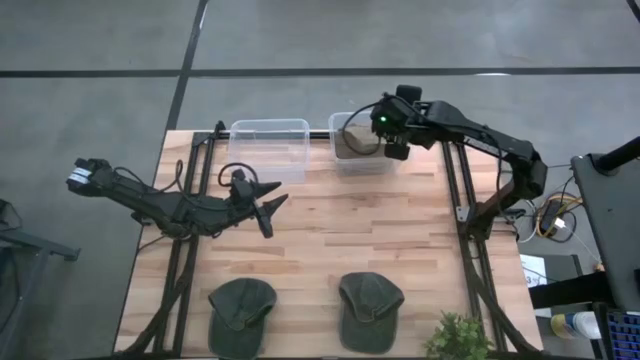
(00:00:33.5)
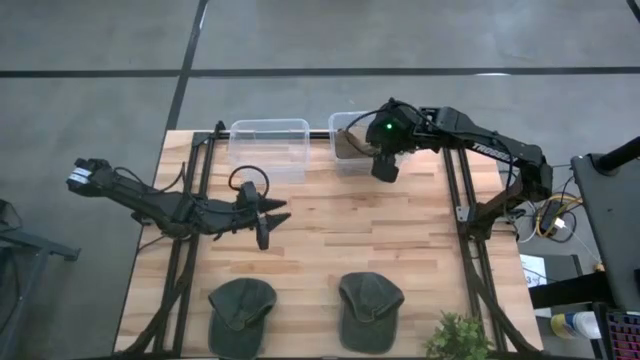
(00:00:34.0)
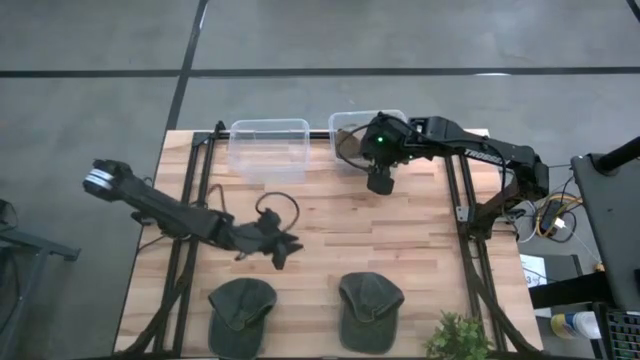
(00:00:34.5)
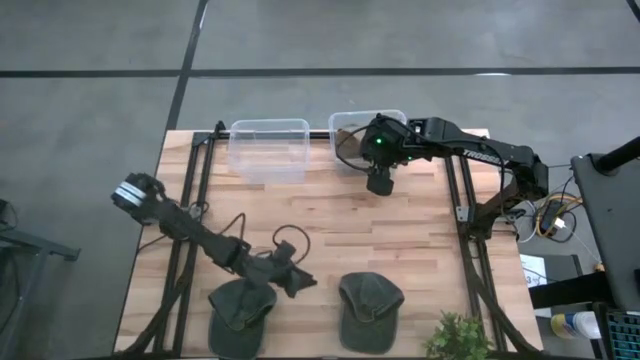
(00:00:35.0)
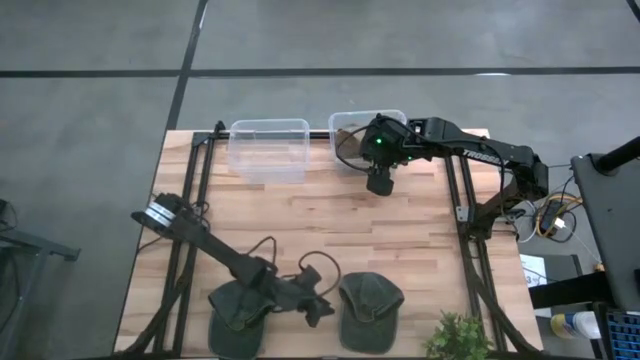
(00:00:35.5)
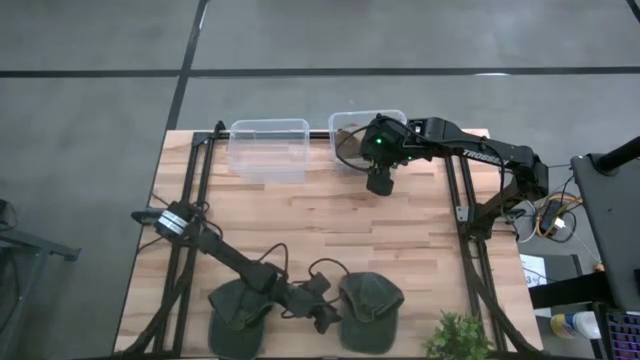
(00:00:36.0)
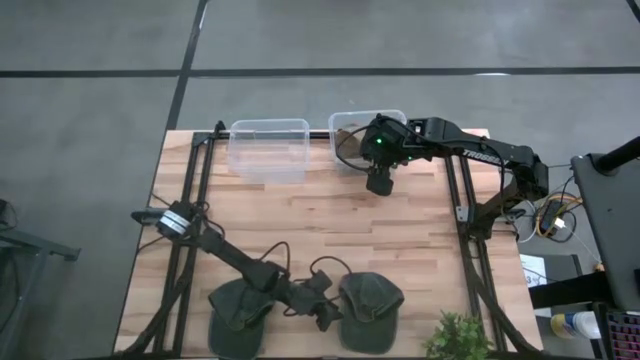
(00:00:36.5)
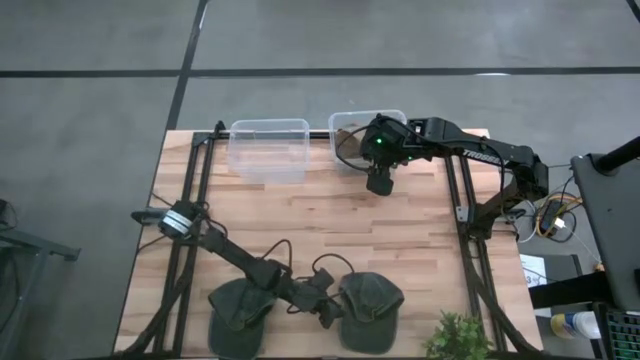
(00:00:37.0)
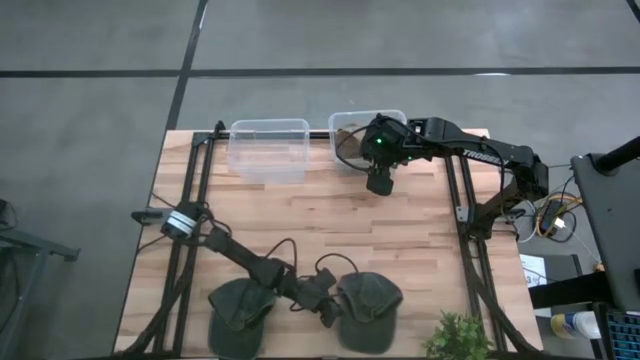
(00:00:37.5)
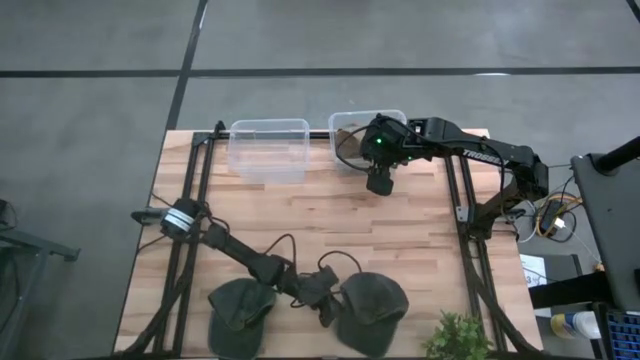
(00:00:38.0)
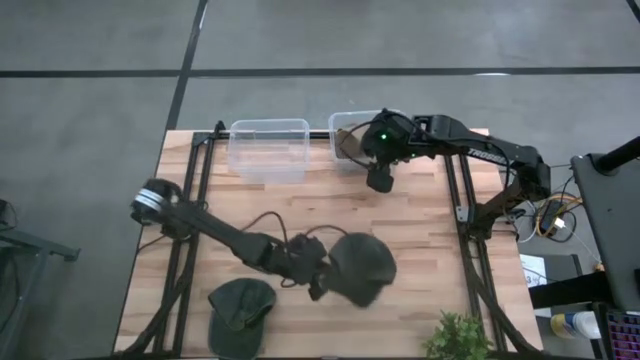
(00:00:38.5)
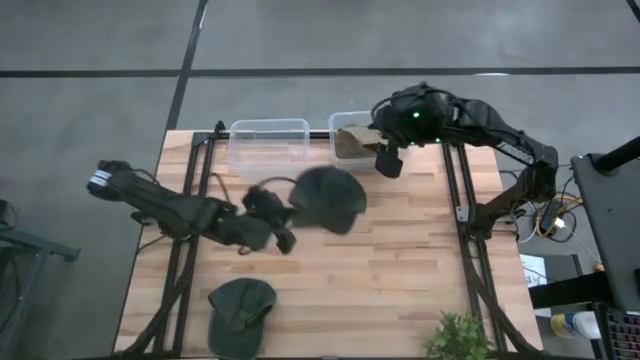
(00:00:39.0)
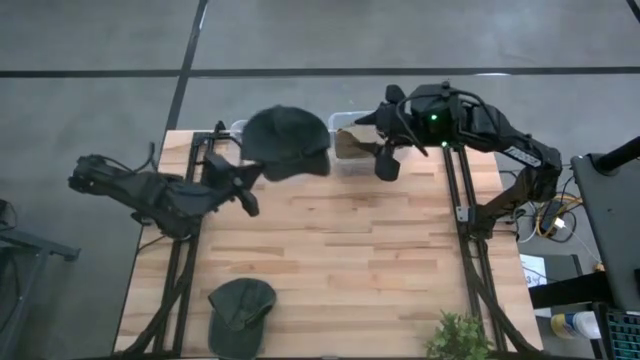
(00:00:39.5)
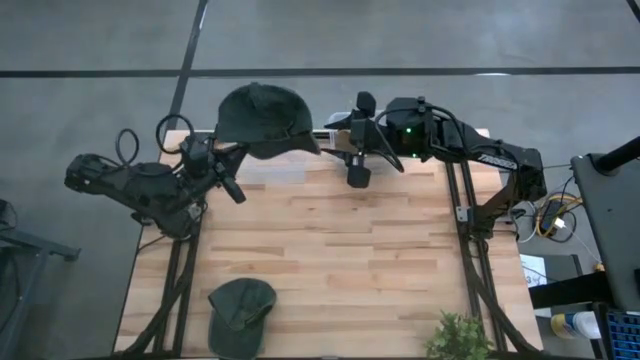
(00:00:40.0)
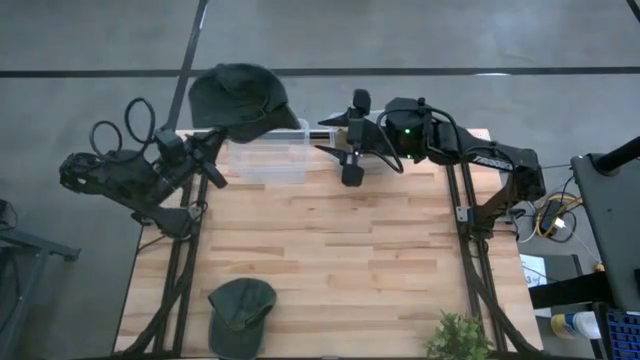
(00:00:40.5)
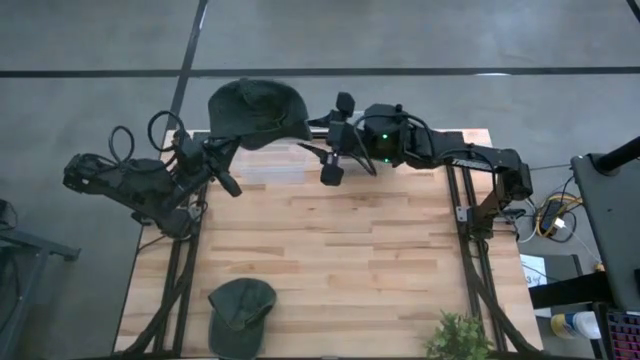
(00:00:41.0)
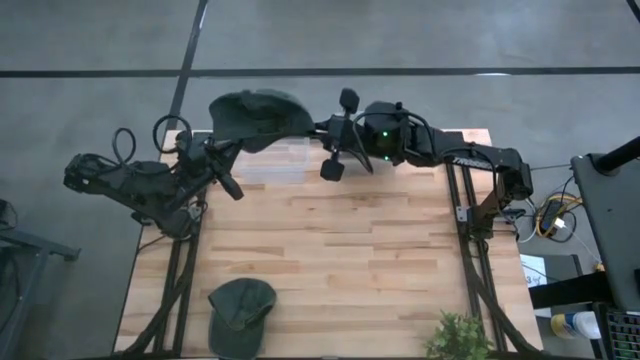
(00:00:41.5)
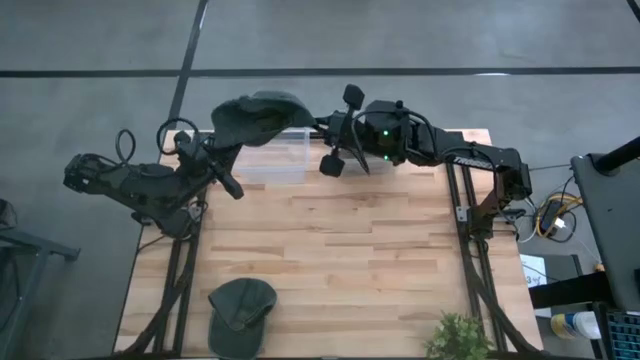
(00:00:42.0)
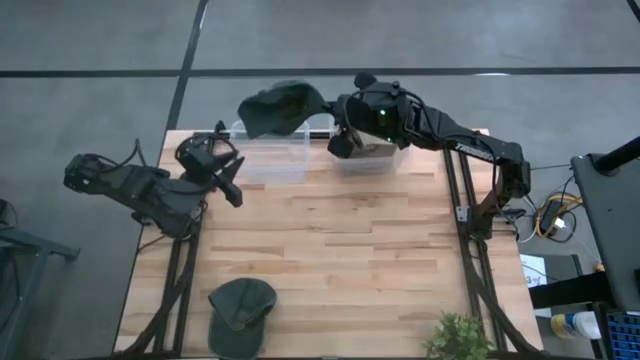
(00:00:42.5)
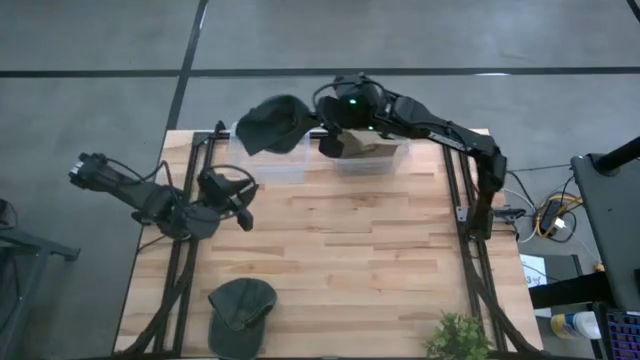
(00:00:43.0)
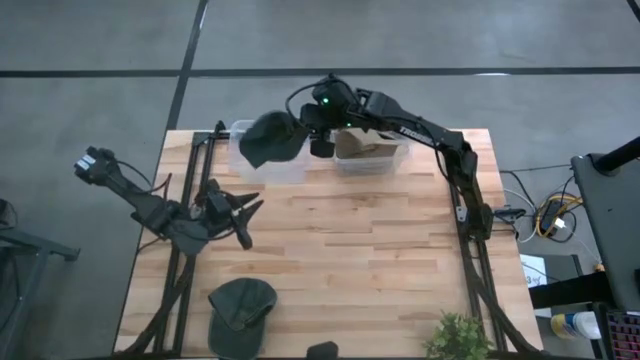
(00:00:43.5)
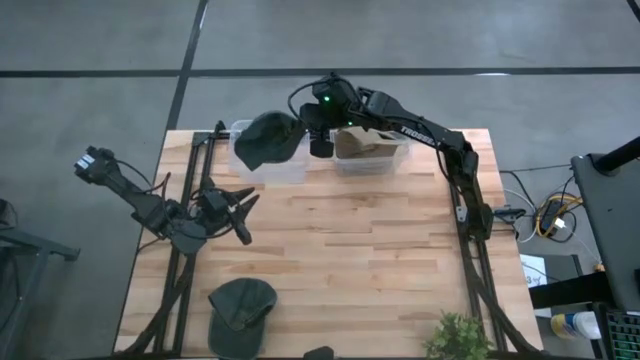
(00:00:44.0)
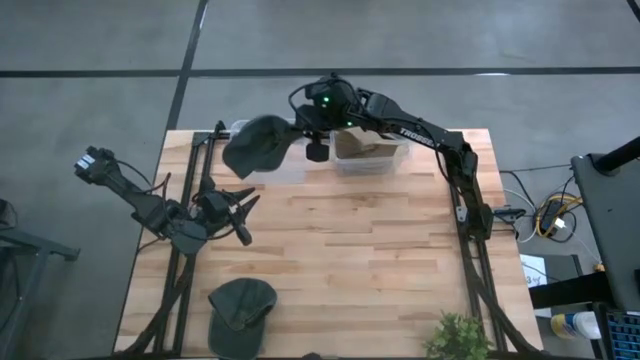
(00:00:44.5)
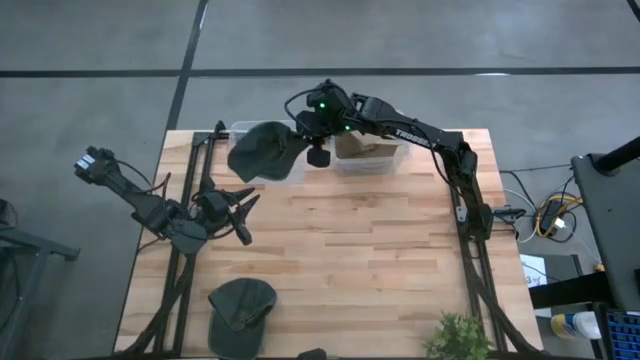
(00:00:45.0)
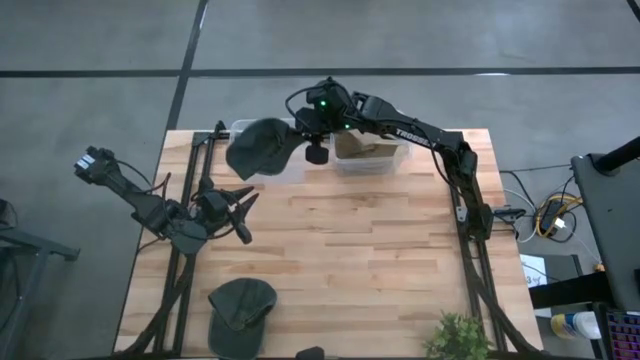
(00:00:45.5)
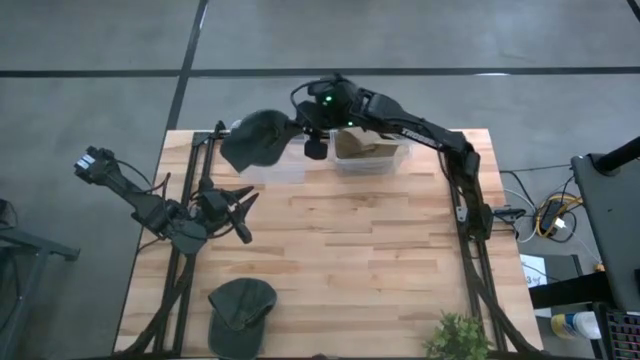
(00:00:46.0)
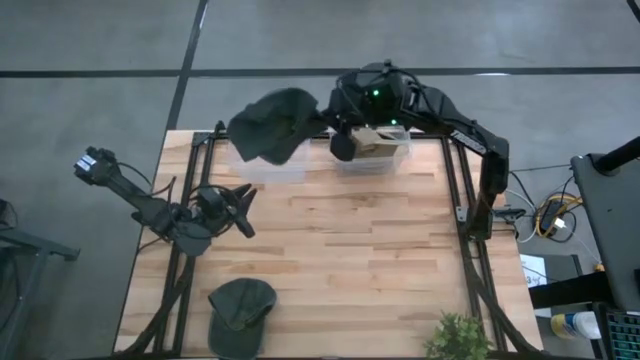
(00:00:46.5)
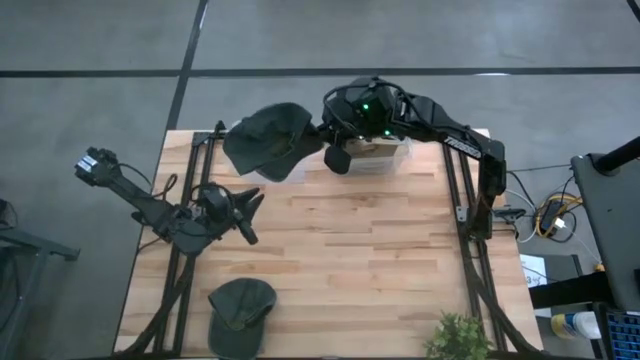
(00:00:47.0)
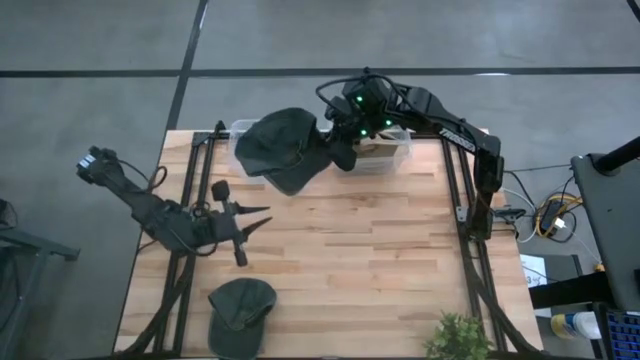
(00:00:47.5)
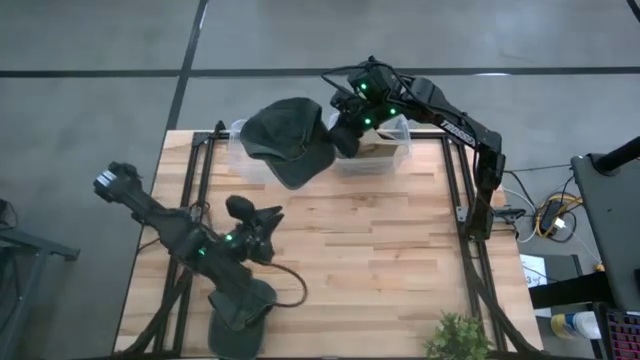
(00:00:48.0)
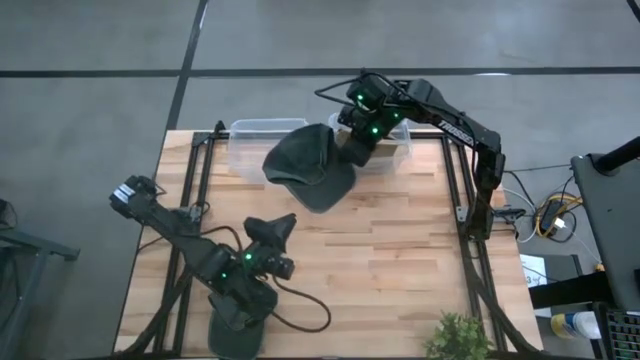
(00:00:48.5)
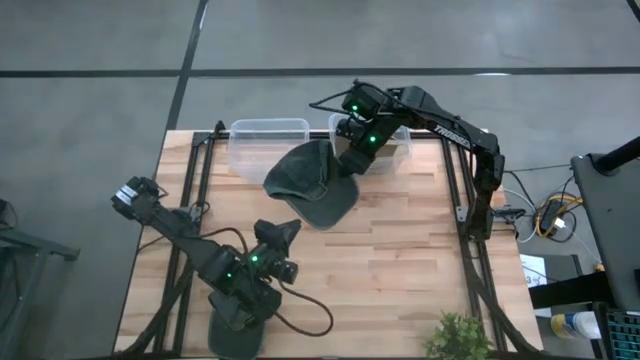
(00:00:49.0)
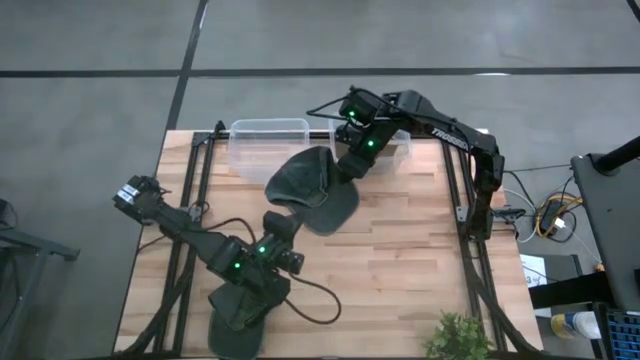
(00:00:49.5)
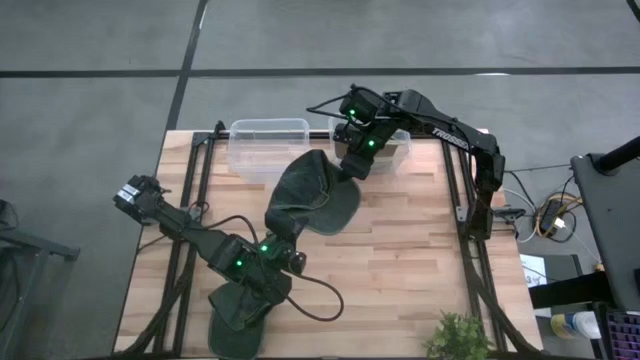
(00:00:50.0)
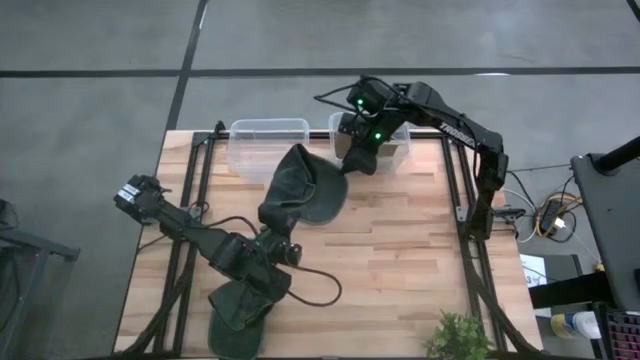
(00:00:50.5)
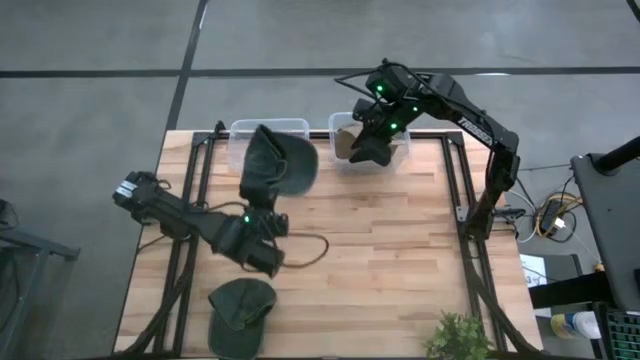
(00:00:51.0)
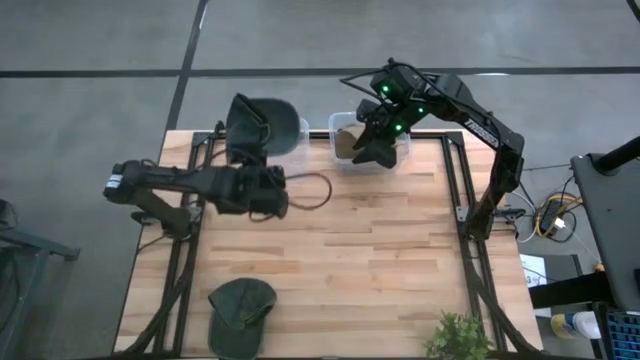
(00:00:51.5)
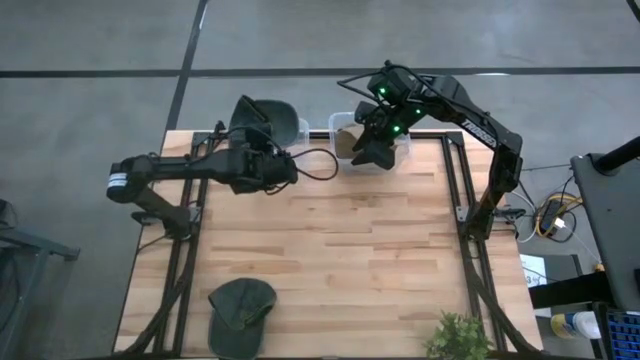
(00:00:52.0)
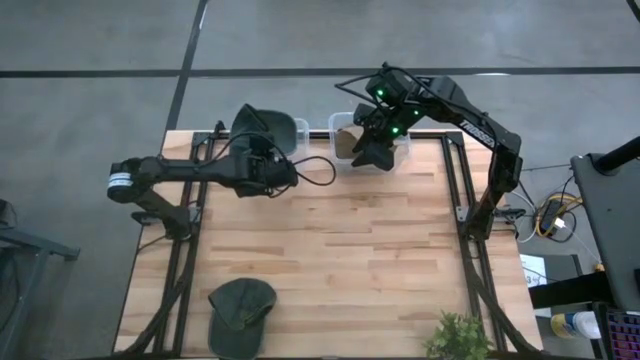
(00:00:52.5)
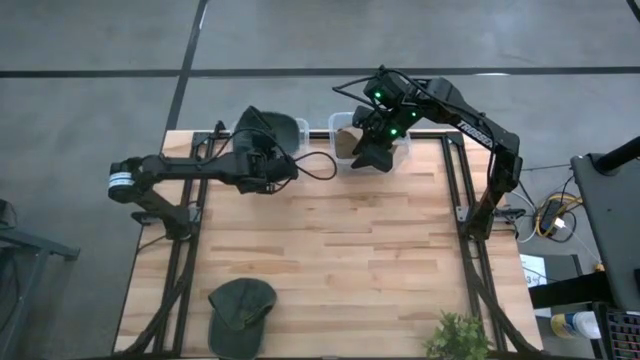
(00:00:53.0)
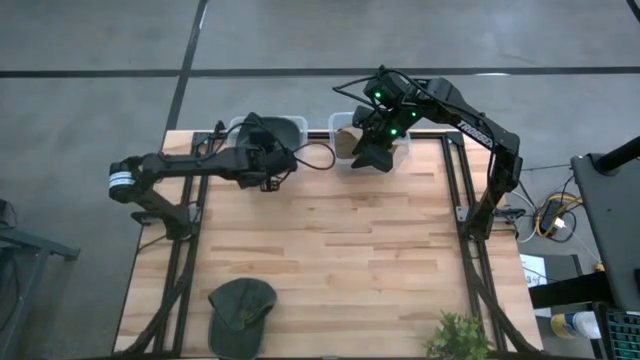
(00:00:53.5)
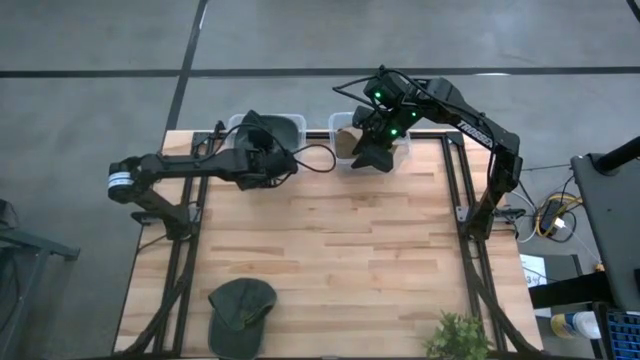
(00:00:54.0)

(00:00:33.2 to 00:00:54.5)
Task: Pick & Place hat
Put the right green cap into the left transparent bin
